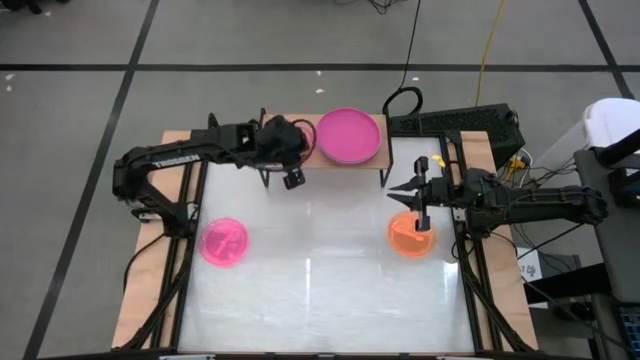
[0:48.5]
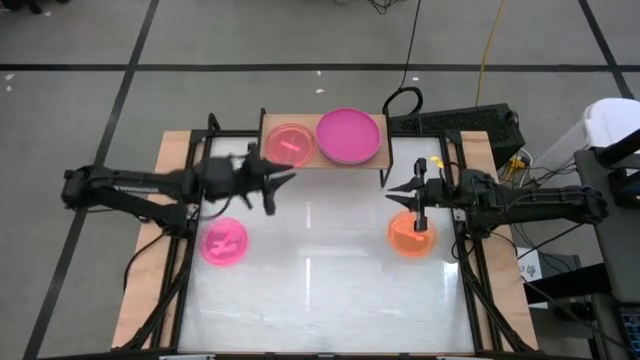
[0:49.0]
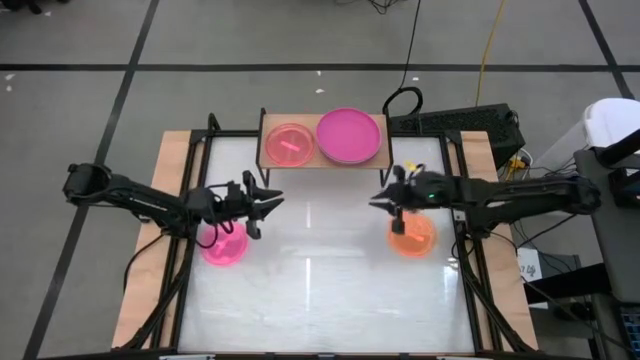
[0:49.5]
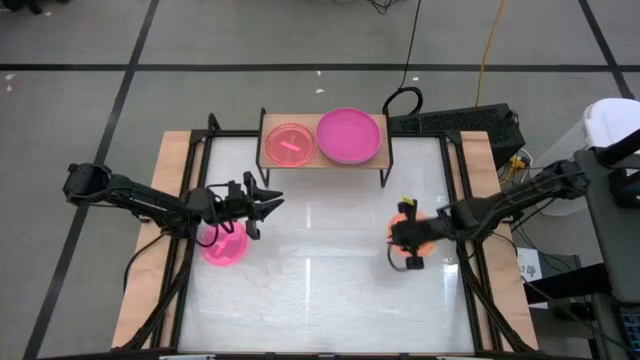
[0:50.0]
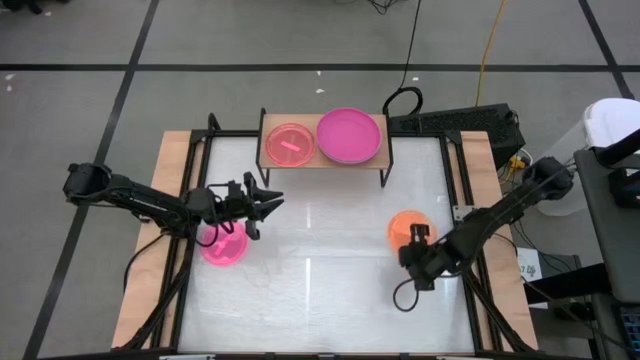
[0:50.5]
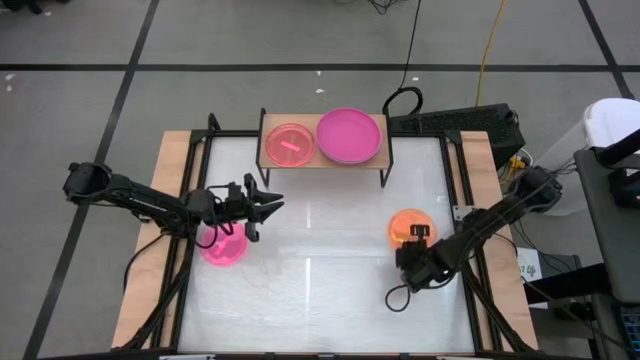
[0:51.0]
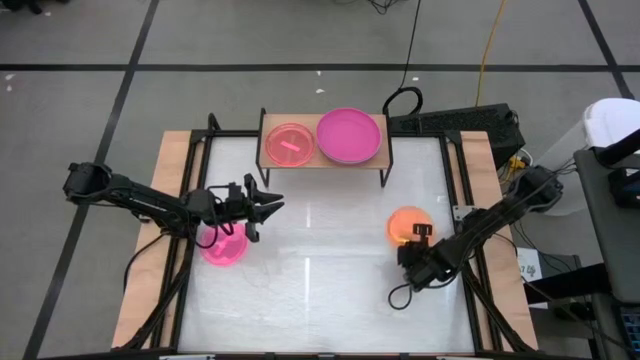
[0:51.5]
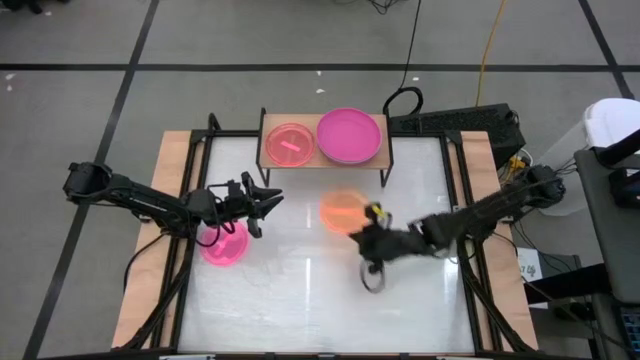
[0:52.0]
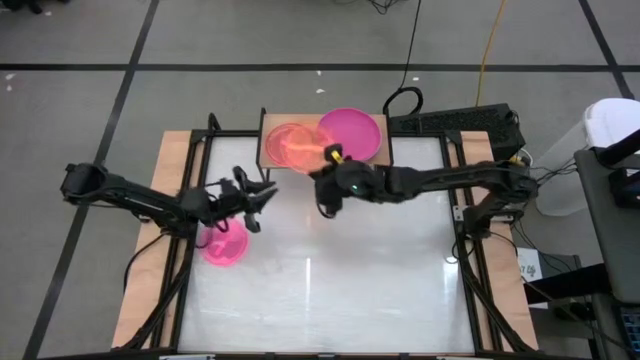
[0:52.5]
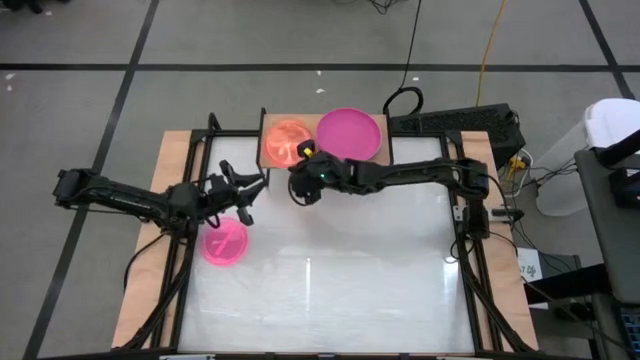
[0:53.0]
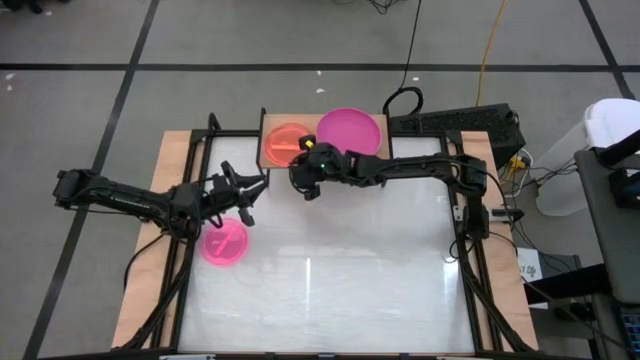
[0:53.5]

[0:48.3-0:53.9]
Task: Place and stack plates onto a shelf
Stack the orange transparent plate on top of the pink transparent plate on the shelf

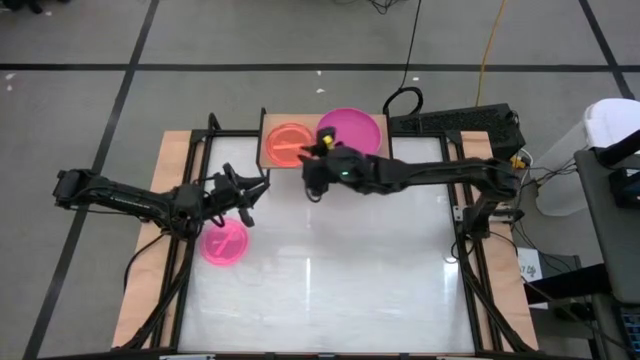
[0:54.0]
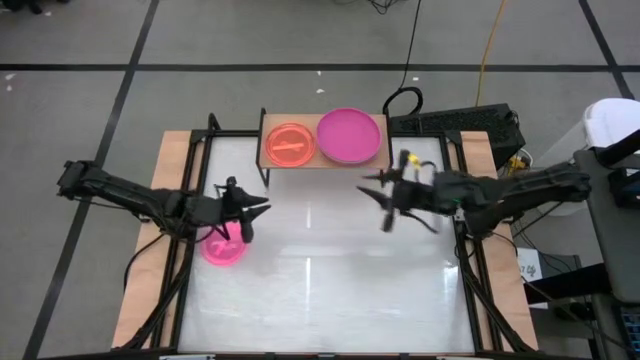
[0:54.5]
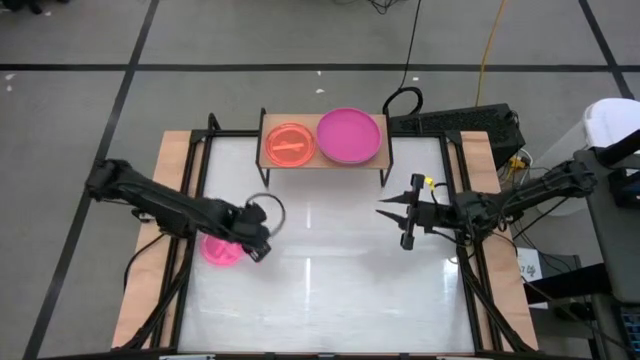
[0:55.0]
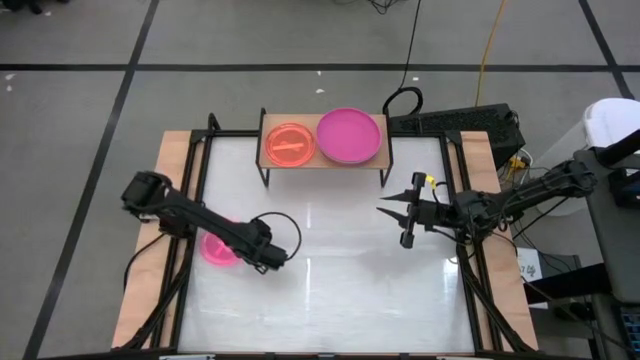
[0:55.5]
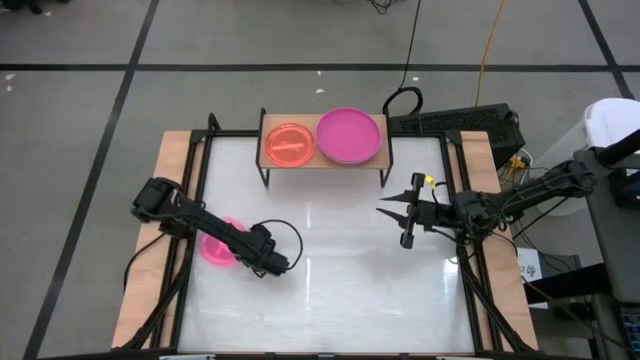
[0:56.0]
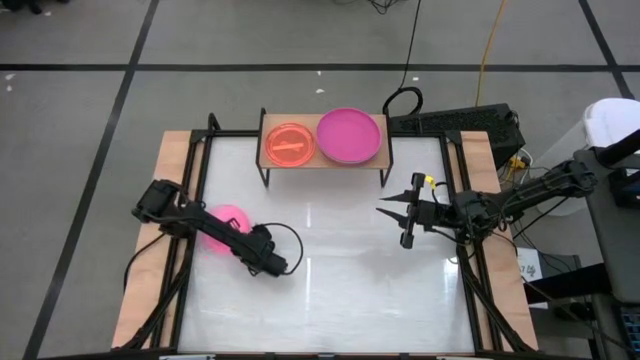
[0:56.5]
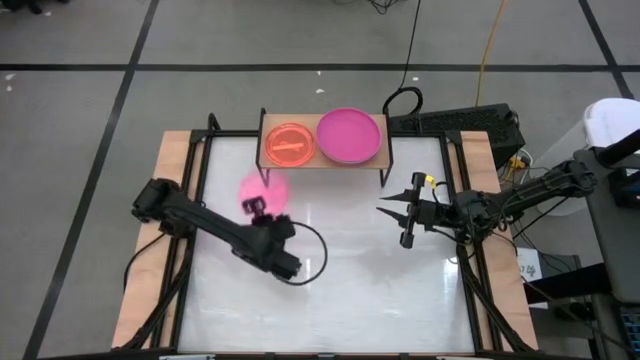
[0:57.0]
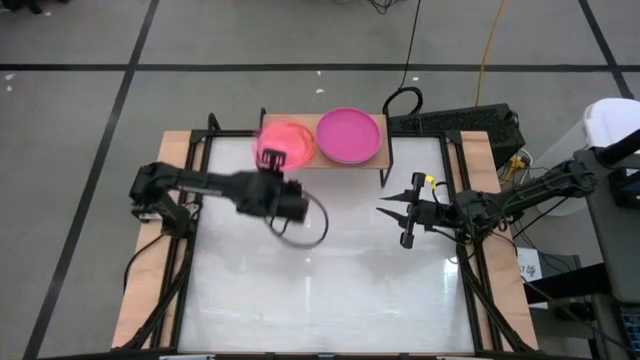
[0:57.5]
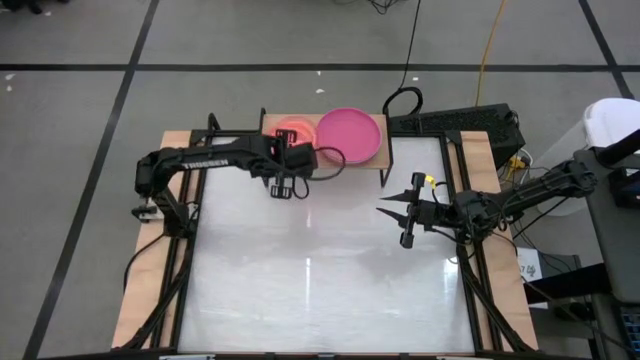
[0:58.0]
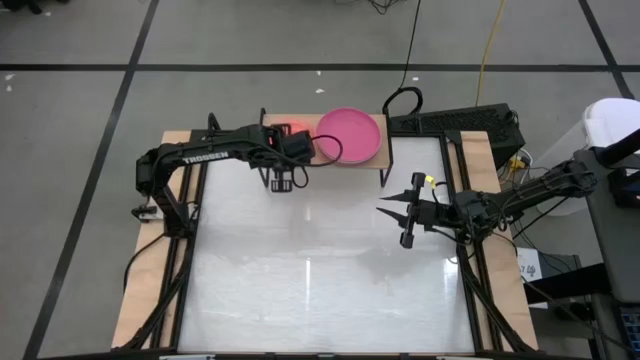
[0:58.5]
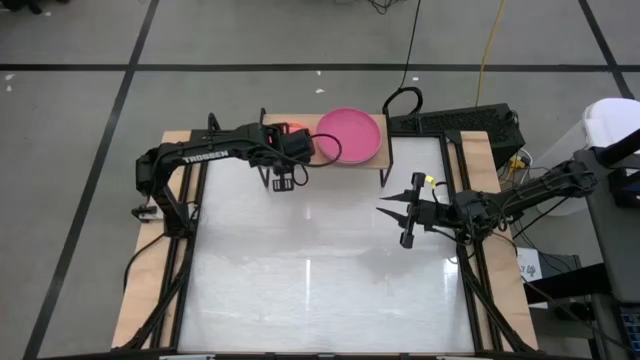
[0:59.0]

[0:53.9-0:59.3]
Stack the pink transparent plate on top of the orange transparent plate on the shelf

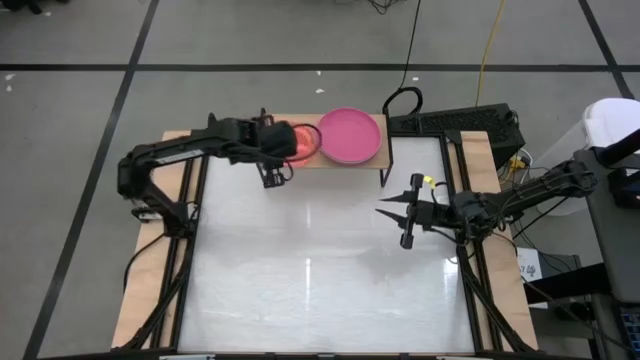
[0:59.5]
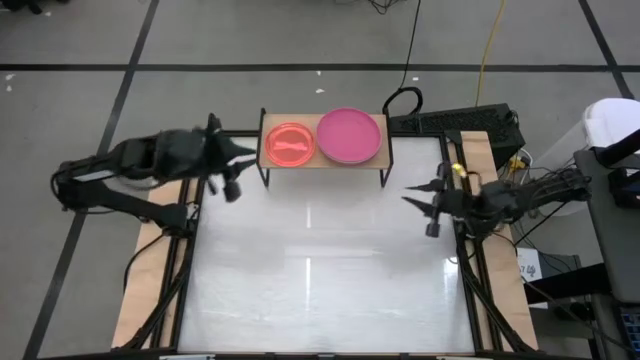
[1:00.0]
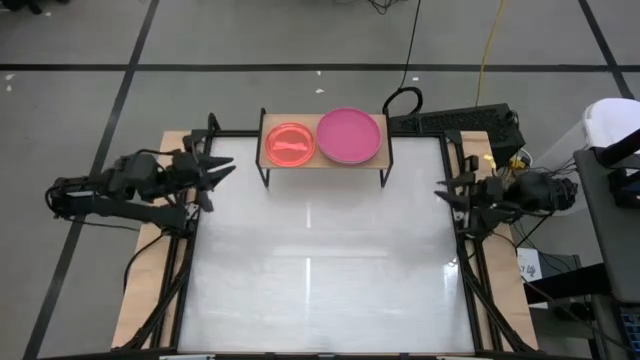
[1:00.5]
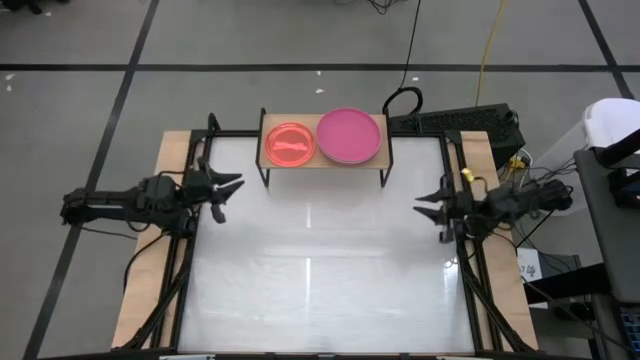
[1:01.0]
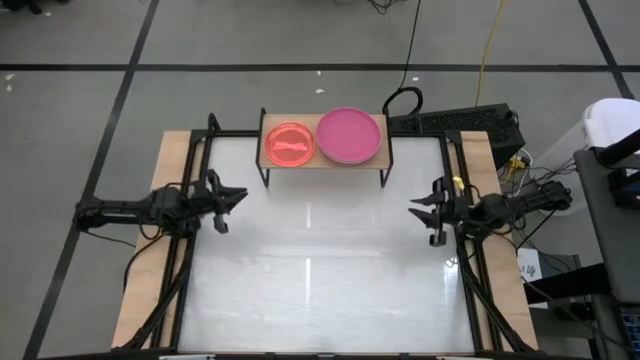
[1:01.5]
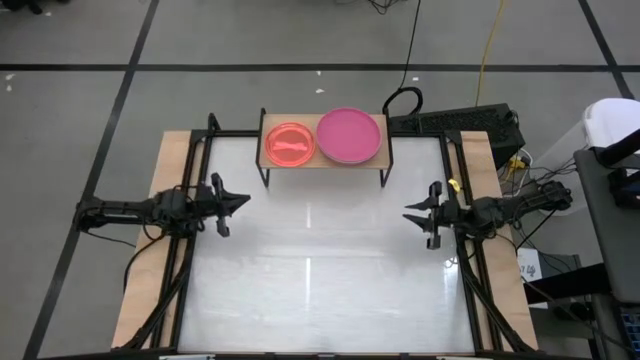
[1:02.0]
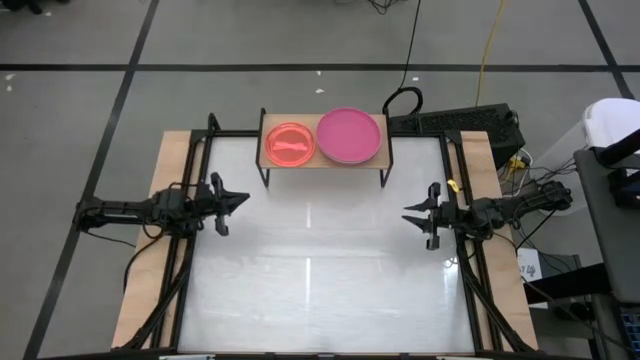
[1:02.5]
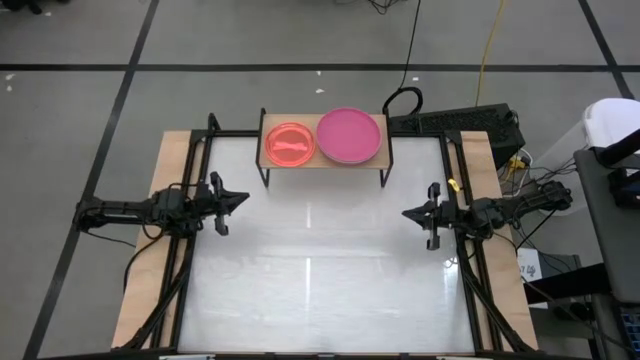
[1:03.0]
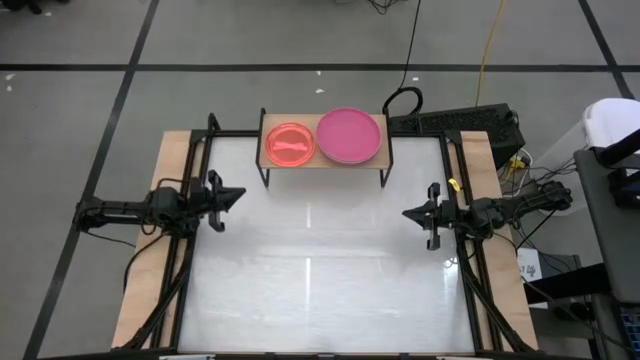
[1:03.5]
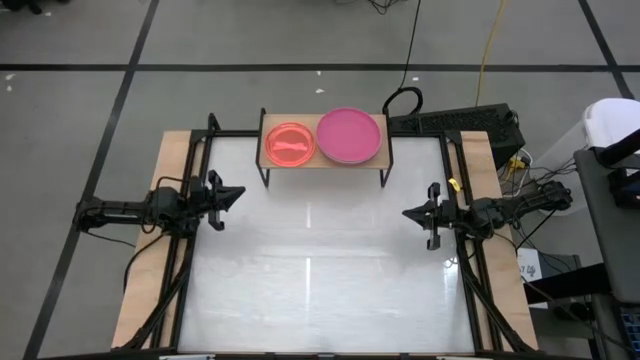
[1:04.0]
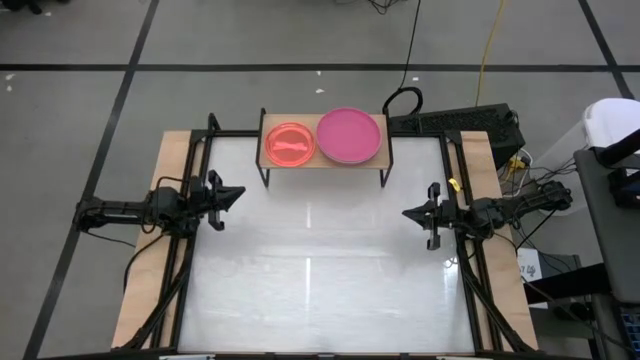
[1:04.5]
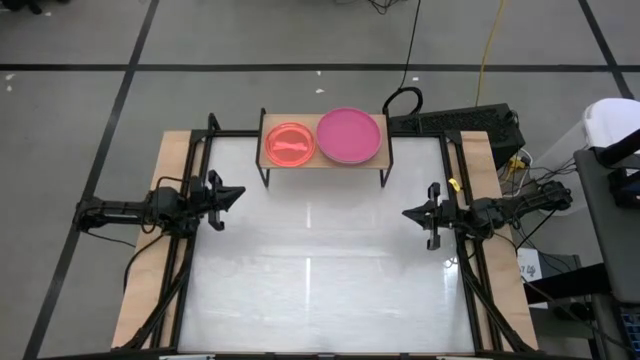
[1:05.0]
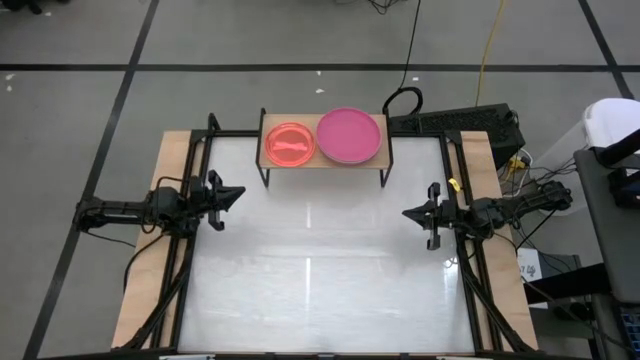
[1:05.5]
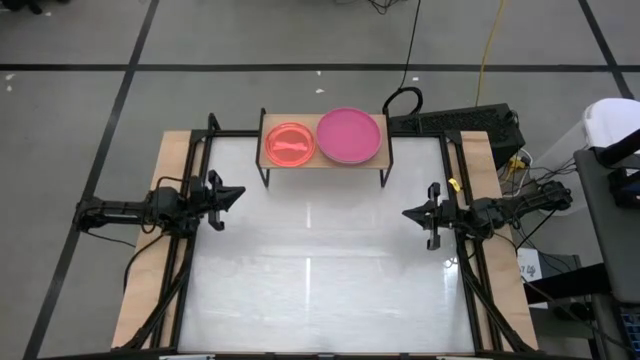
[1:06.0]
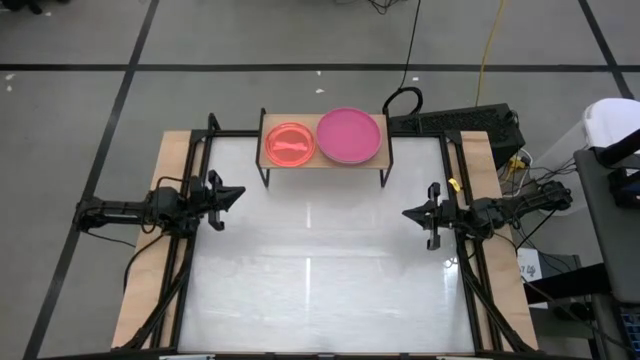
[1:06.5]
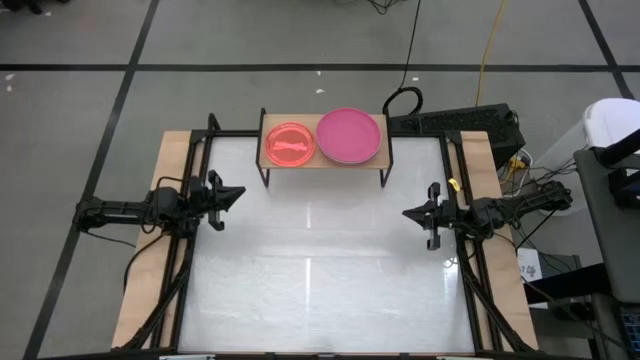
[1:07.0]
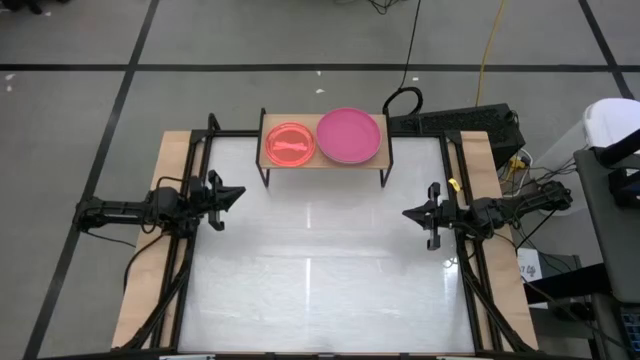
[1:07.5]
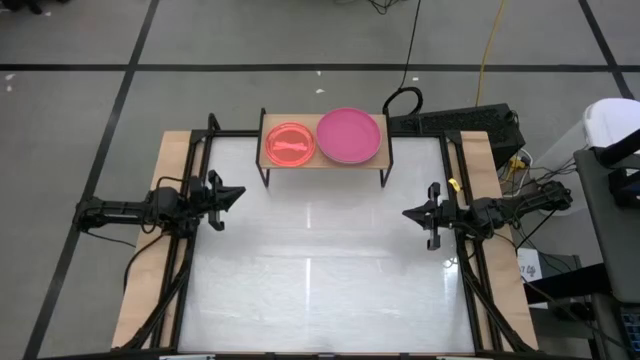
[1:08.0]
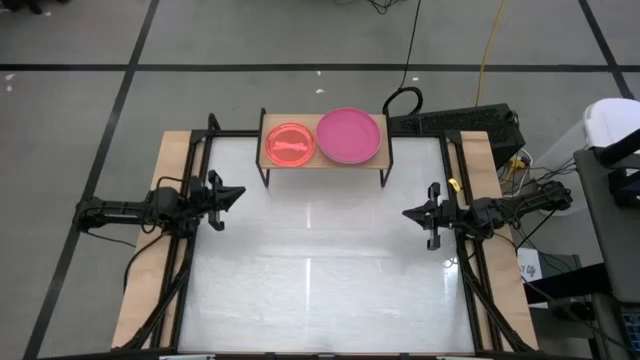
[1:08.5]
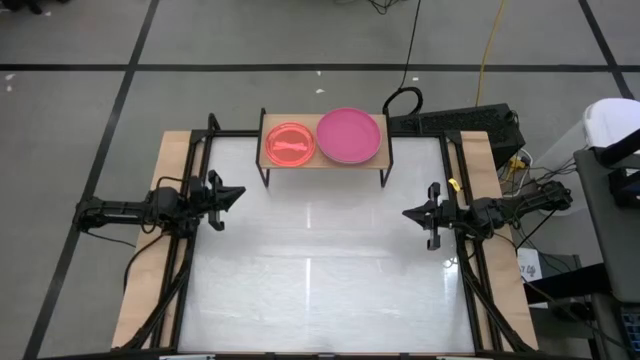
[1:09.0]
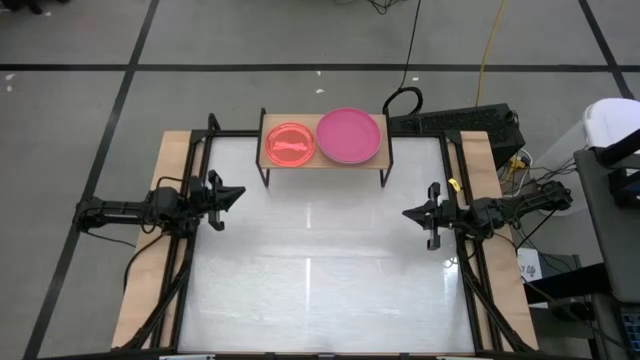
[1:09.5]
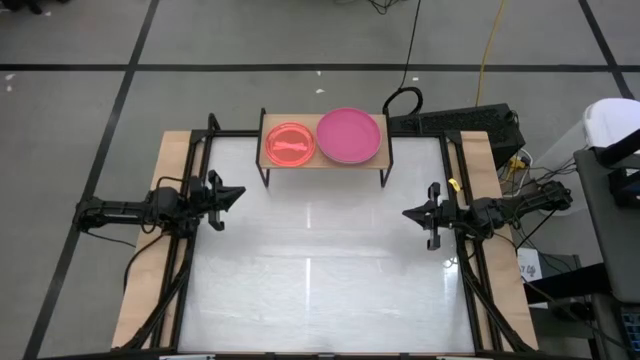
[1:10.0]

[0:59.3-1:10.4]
Return to Home Position
